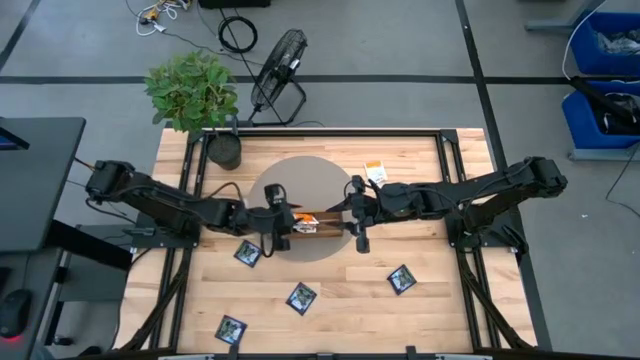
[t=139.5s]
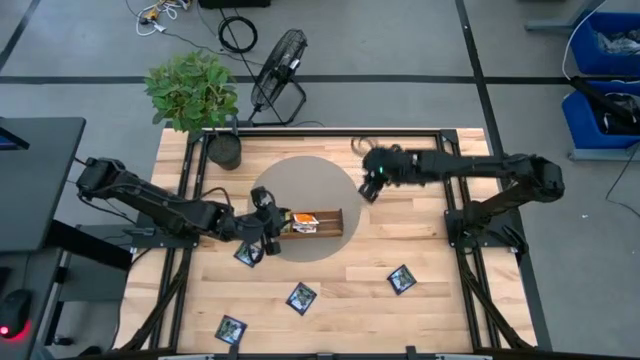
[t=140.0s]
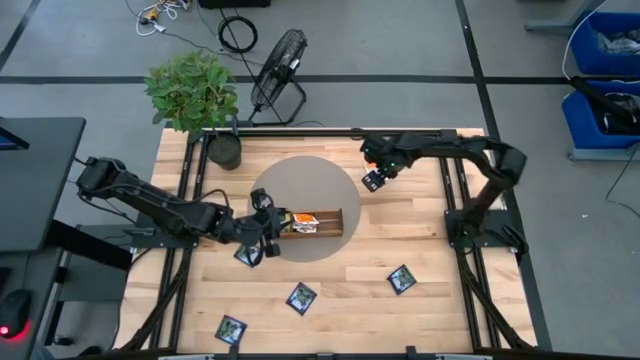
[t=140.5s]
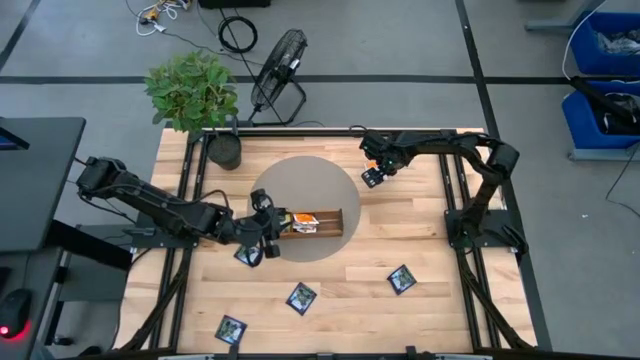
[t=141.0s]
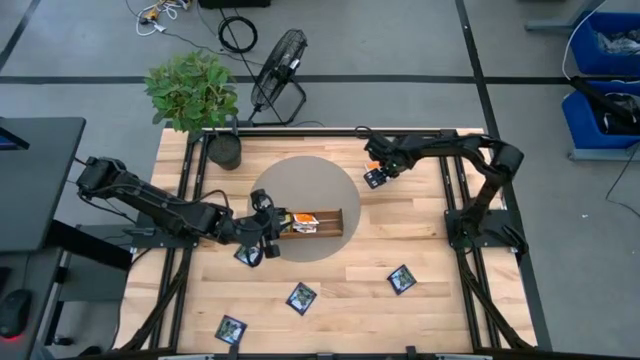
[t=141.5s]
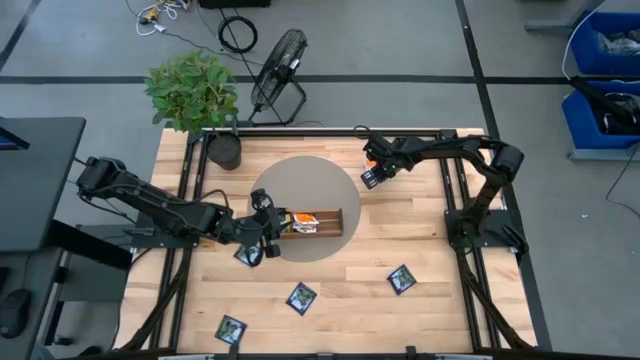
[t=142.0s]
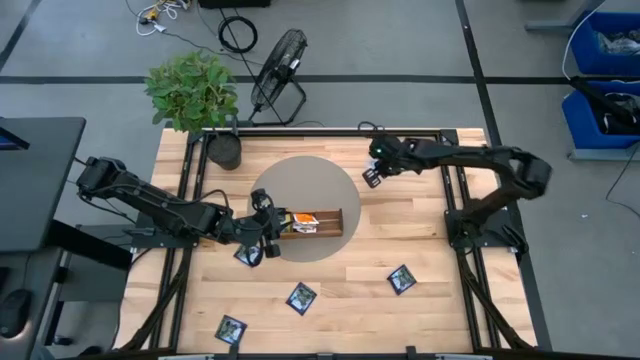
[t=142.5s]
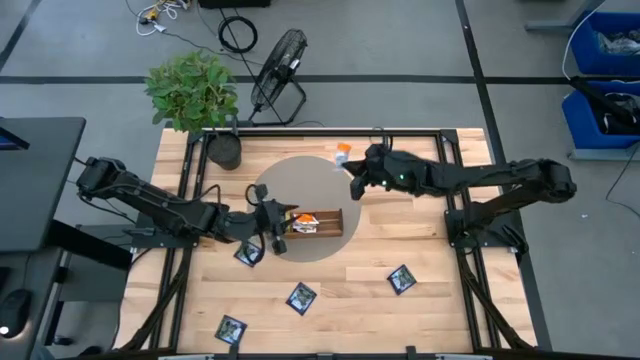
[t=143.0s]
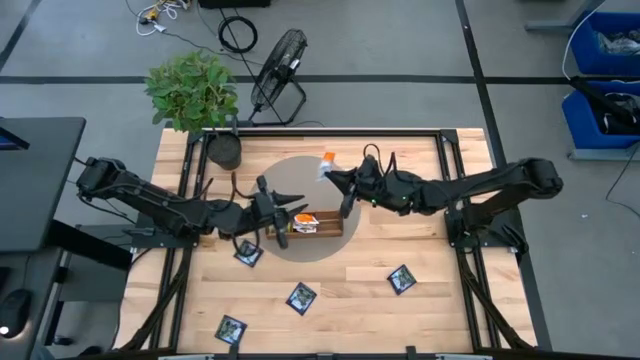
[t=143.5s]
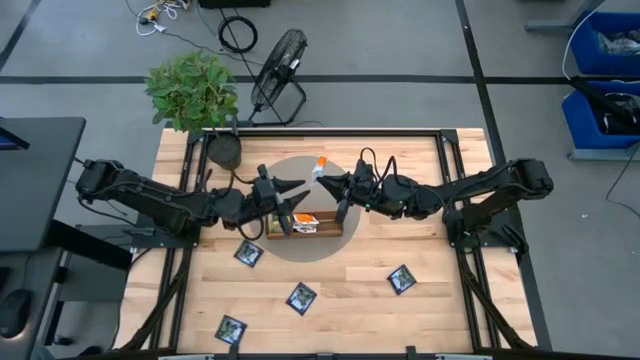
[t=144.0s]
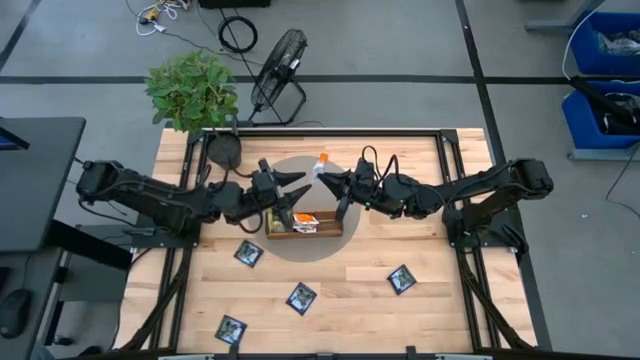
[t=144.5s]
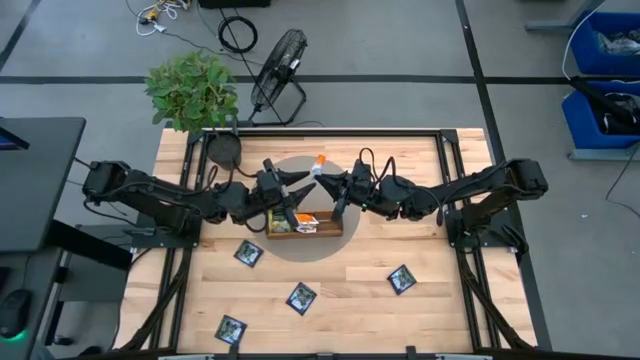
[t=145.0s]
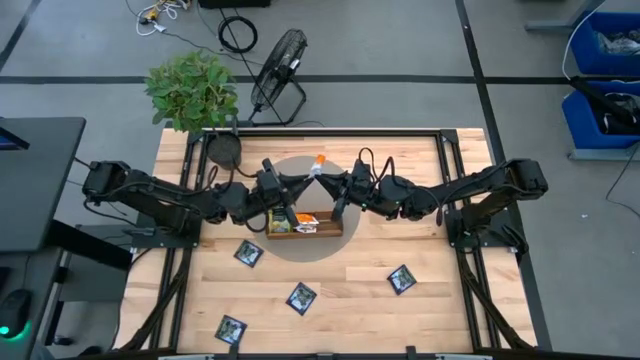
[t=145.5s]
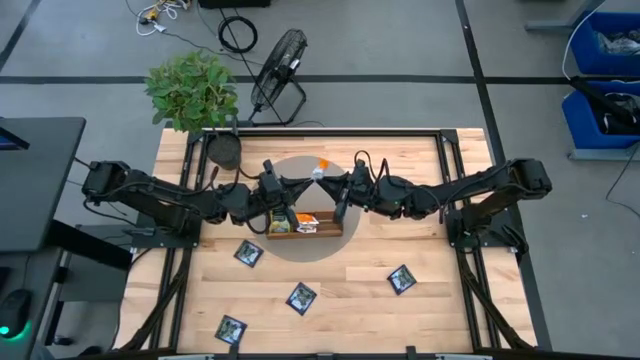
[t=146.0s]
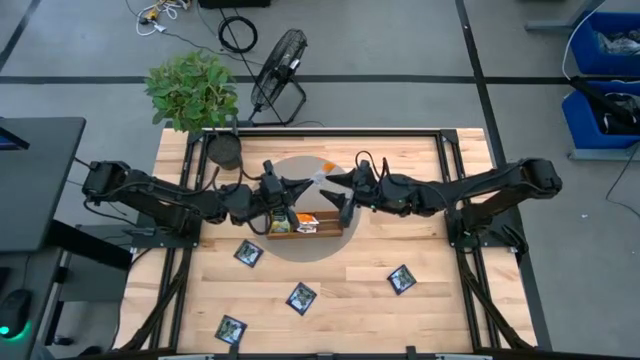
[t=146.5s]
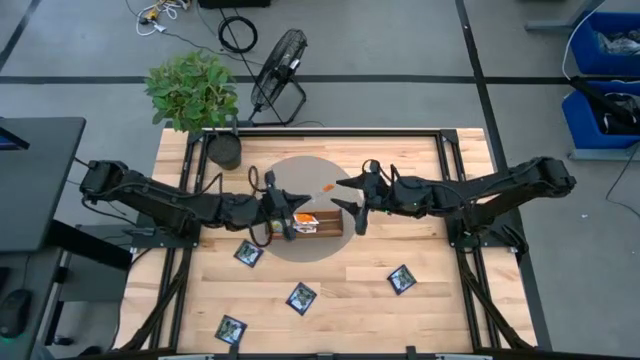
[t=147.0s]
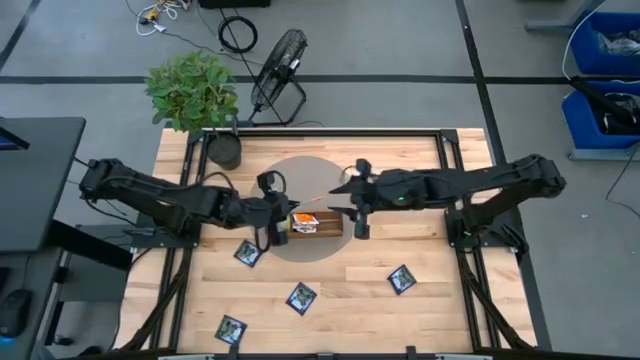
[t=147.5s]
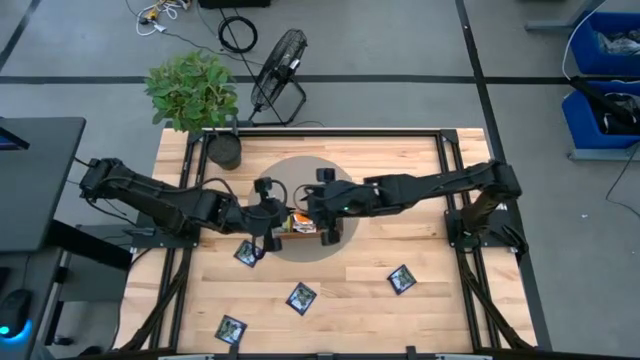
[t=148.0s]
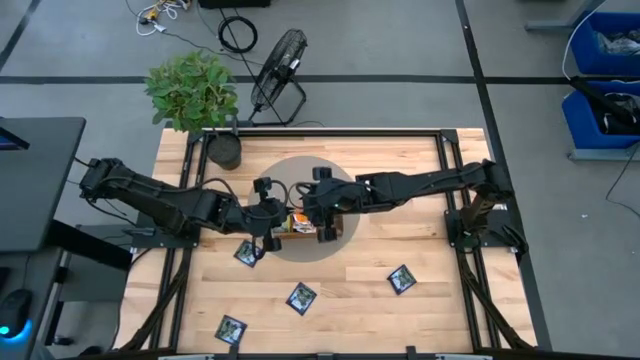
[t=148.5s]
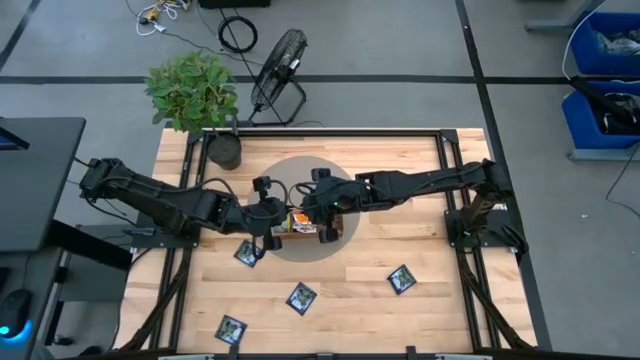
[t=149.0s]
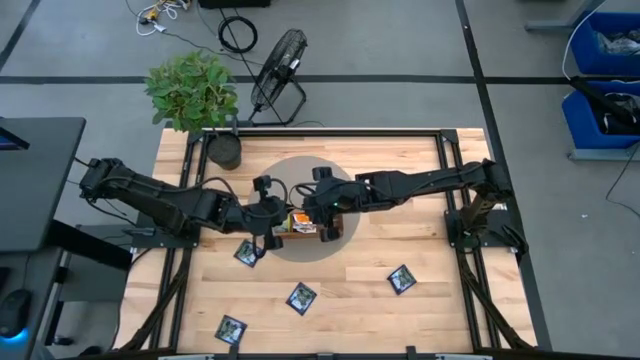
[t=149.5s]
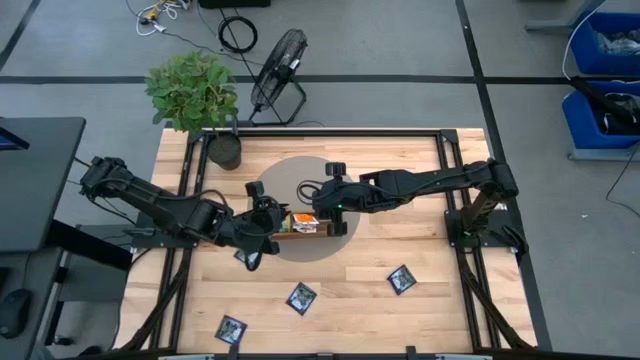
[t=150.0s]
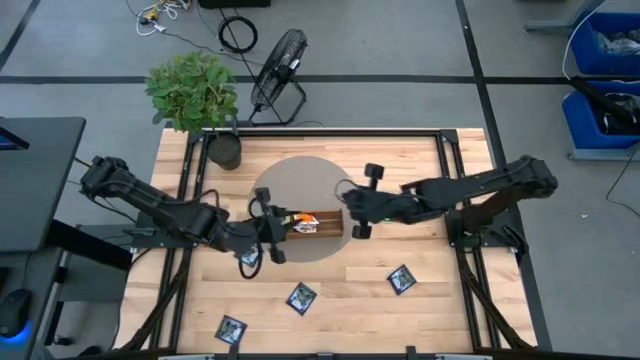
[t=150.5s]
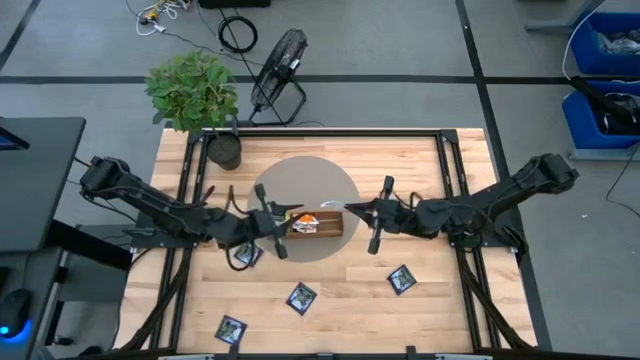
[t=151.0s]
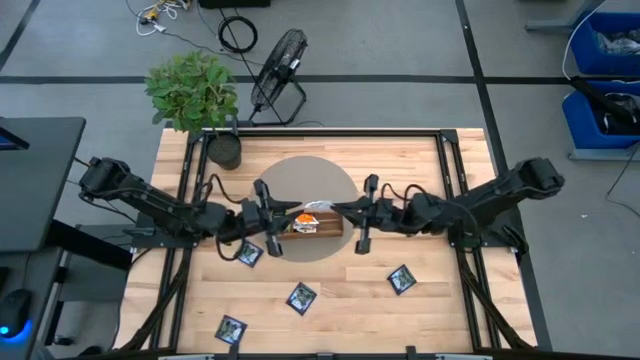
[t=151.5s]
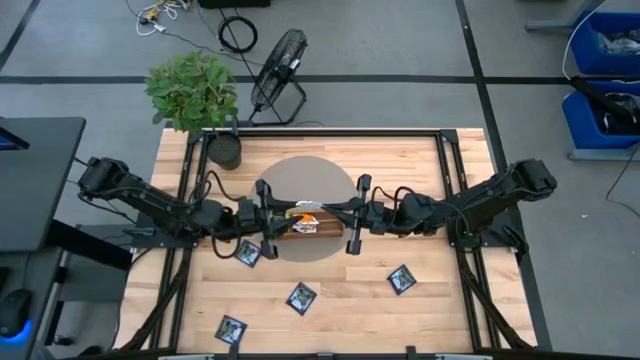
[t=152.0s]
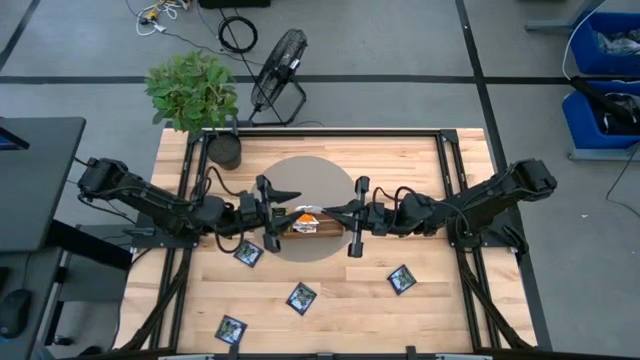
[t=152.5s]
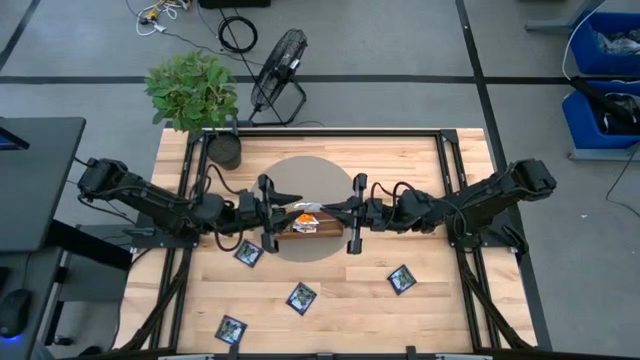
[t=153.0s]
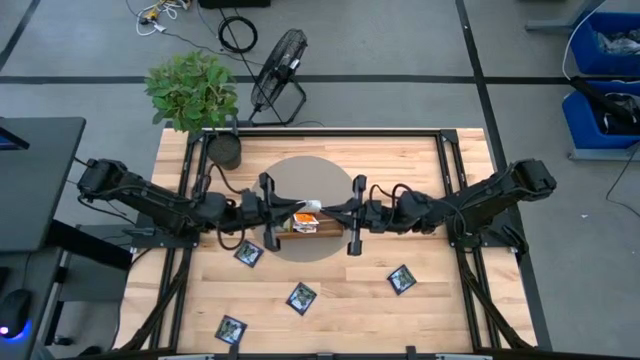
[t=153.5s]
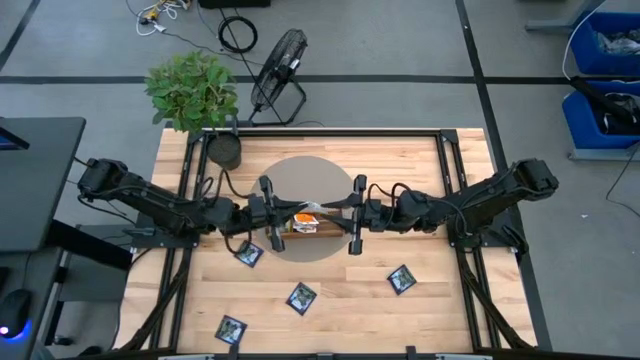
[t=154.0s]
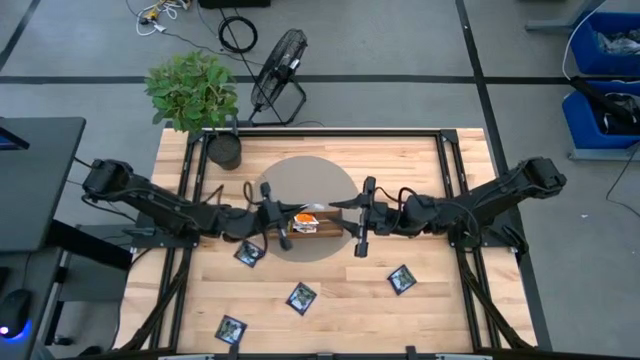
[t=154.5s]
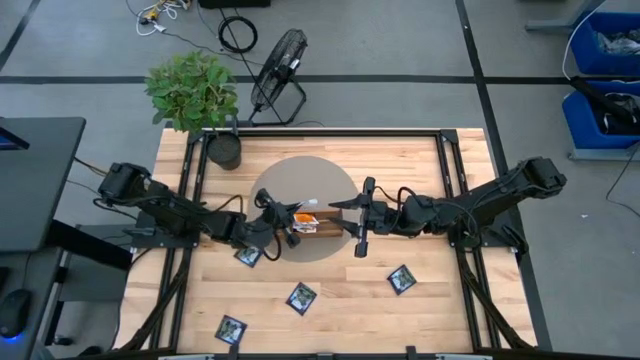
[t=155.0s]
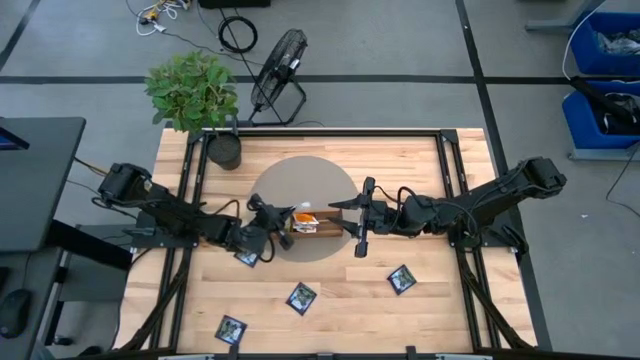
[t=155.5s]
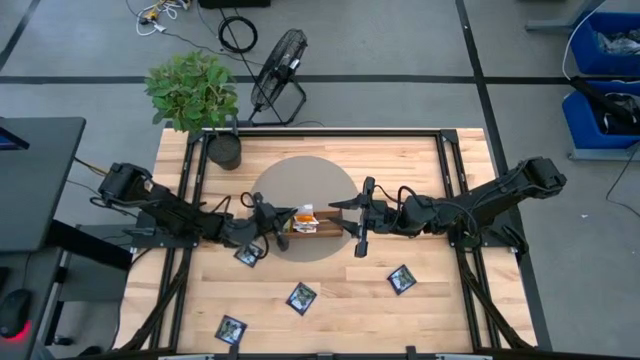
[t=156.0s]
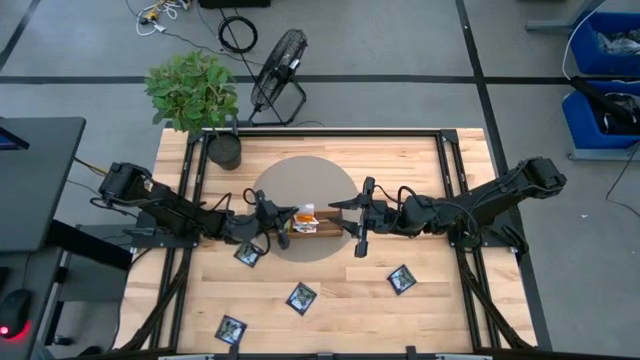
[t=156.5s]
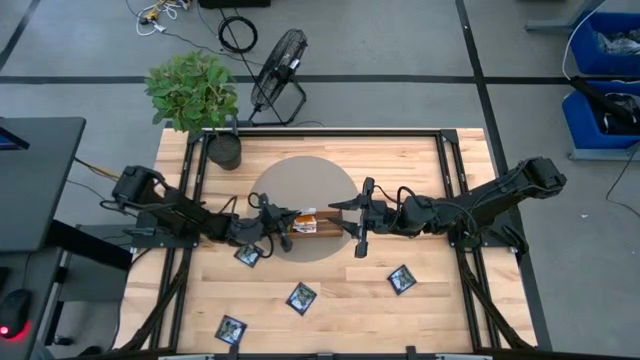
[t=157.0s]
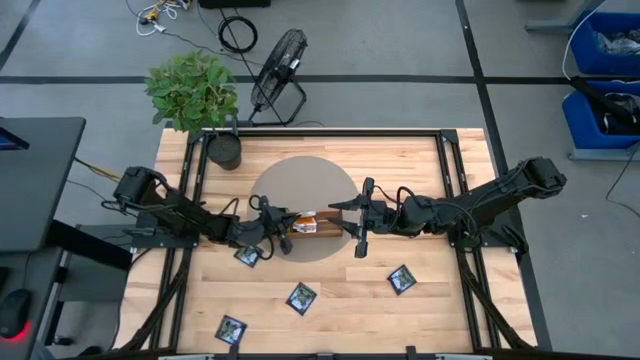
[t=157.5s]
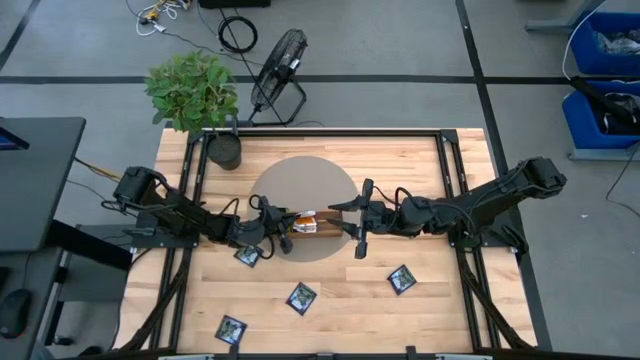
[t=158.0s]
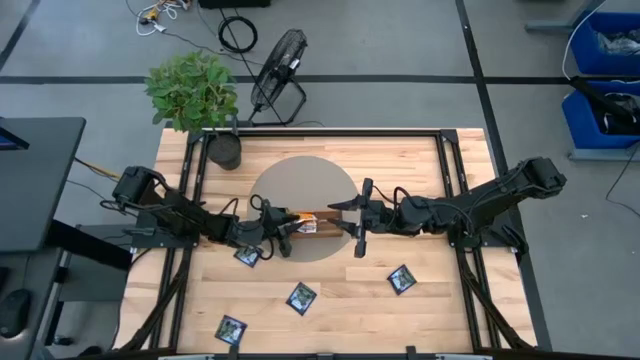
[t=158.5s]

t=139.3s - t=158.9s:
Task: Pick & Place Tea
Put the orange tea bag into the wooden organizer
